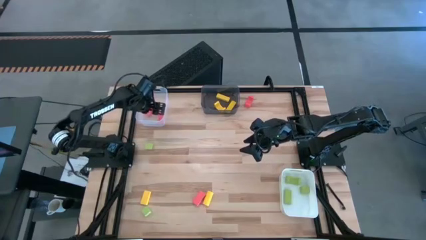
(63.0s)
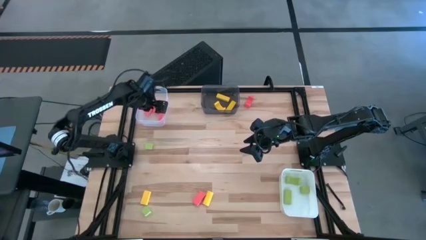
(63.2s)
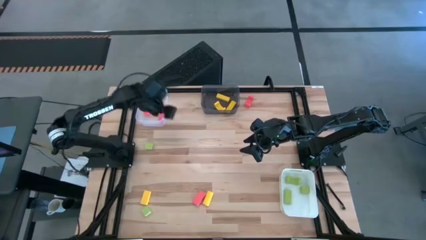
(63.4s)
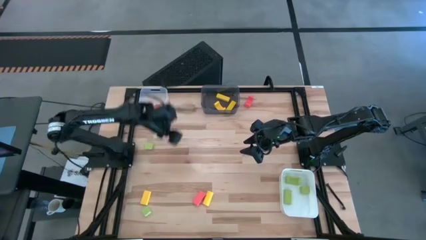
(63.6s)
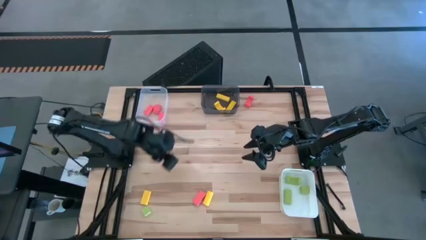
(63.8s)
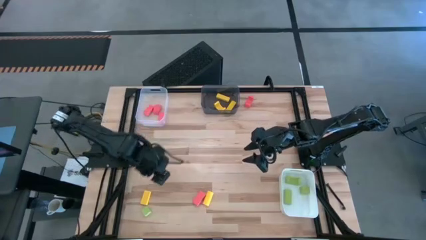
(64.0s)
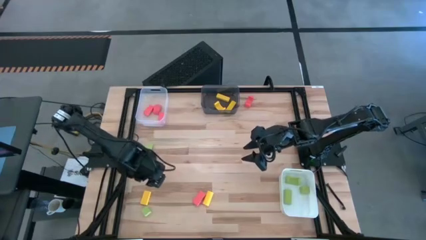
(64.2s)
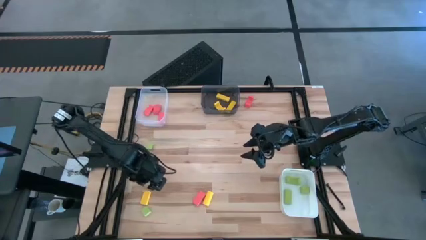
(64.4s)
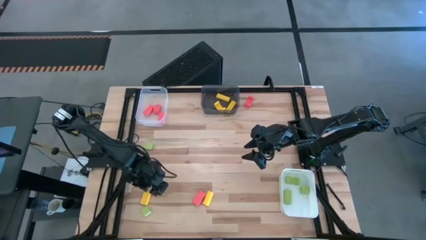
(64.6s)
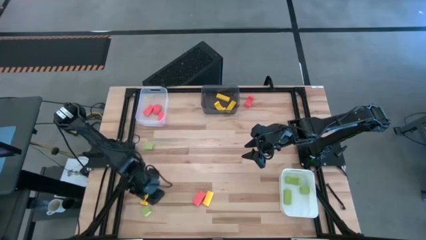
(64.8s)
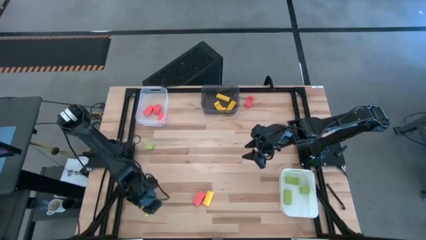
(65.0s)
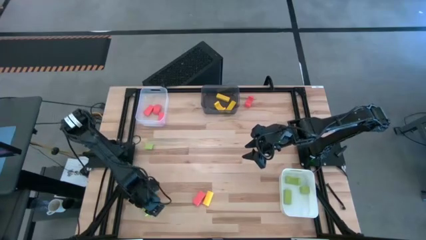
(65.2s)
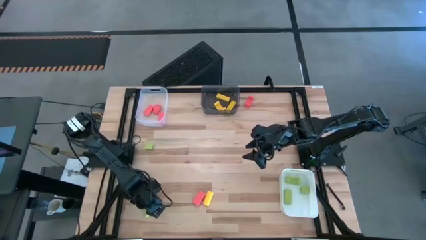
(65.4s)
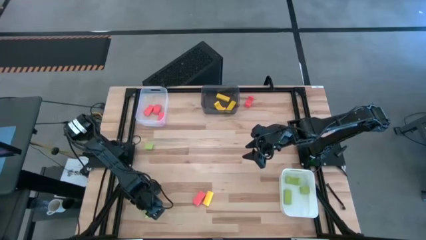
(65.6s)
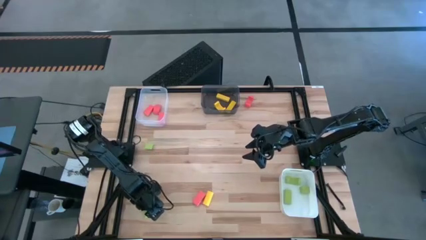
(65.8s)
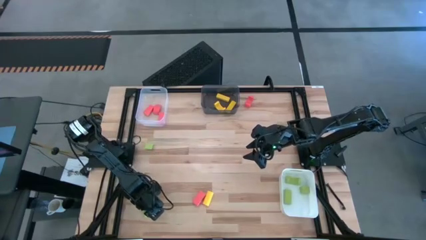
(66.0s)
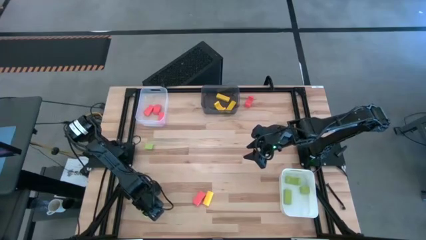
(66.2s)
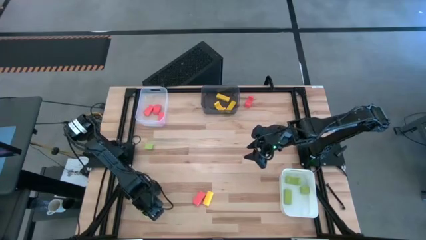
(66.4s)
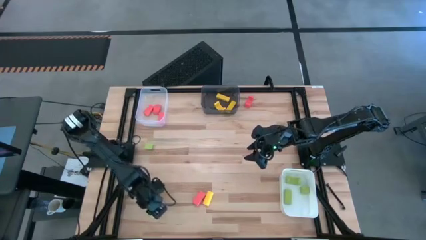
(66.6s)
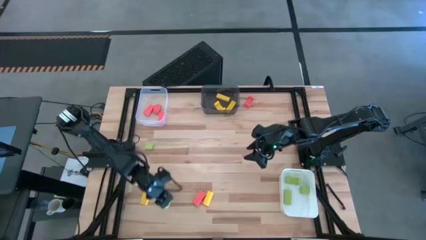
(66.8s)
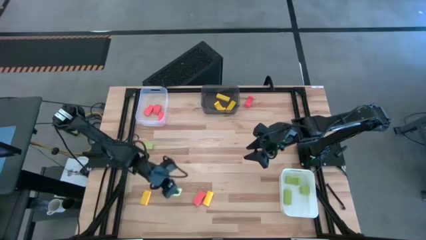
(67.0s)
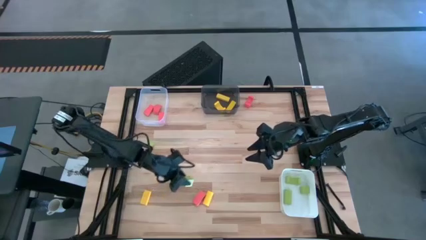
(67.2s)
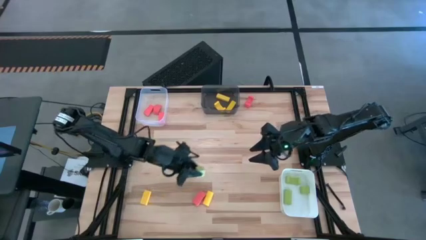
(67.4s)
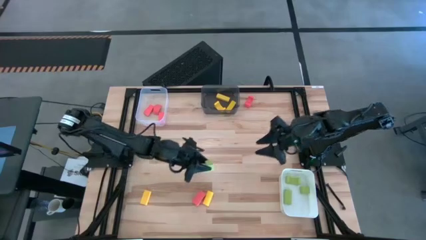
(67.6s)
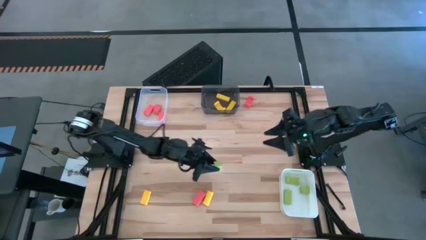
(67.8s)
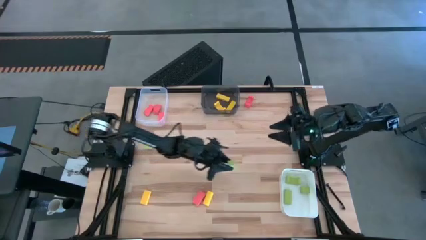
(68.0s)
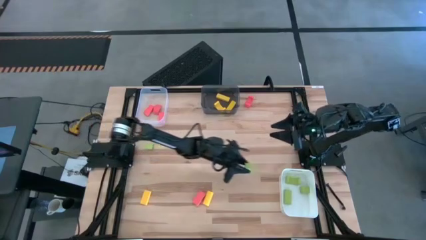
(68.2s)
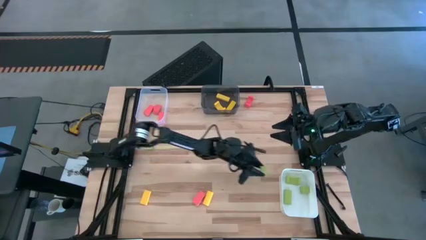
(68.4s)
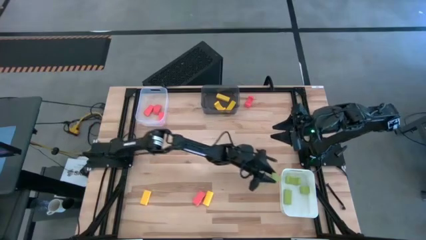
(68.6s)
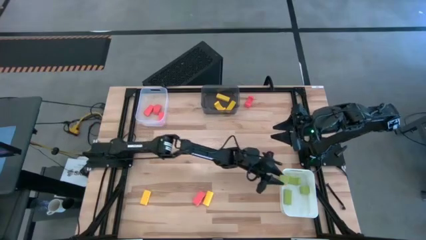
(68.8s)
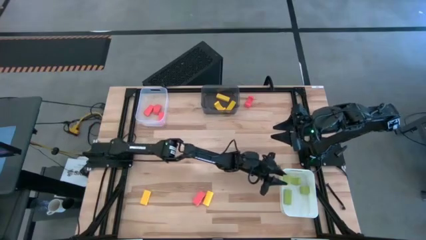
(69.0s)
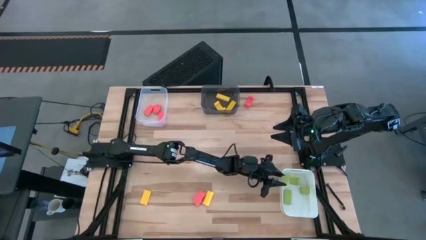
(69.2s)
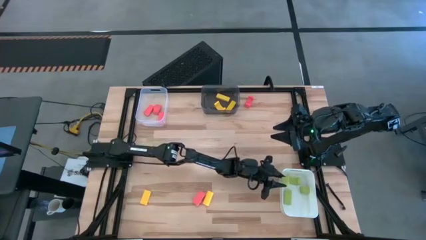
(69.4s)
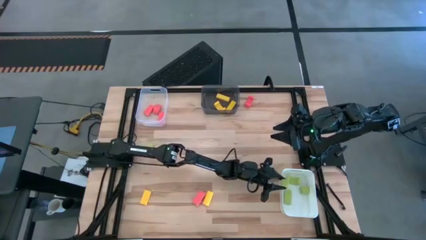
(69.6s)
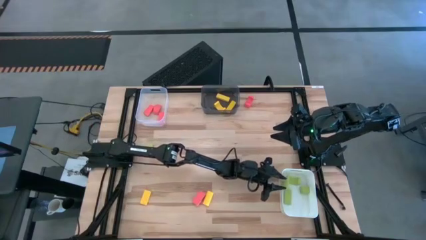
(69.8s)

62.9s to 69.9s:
Task: Sort & place blocks by color
Put the green block into the white bin

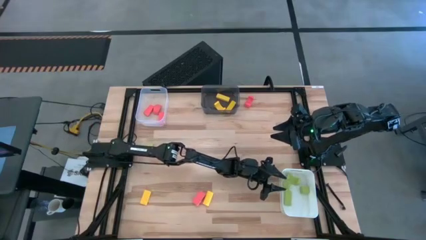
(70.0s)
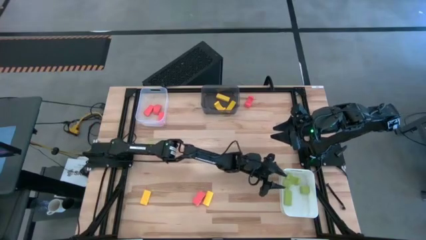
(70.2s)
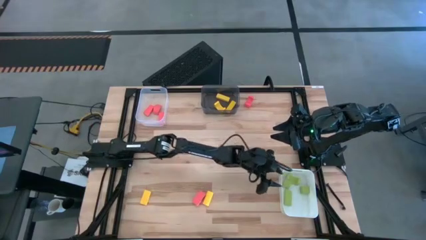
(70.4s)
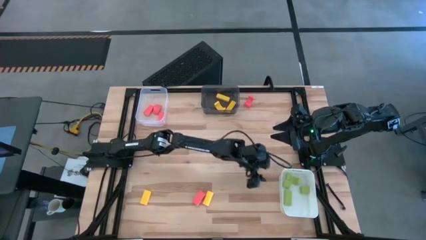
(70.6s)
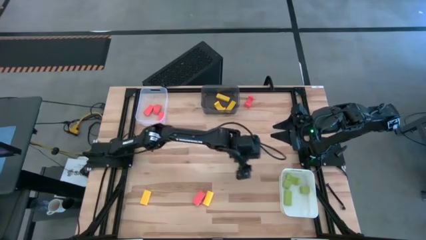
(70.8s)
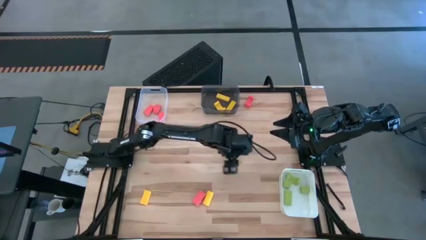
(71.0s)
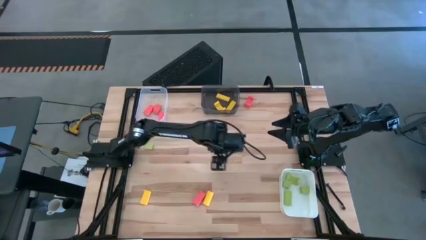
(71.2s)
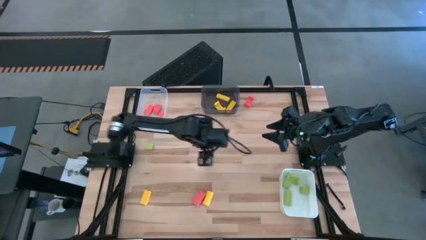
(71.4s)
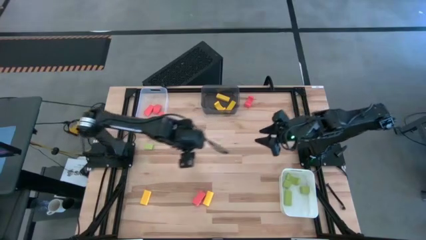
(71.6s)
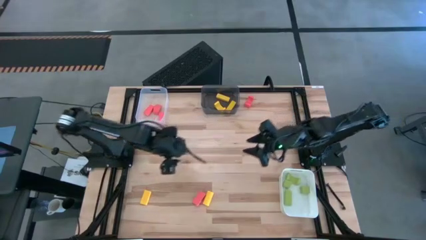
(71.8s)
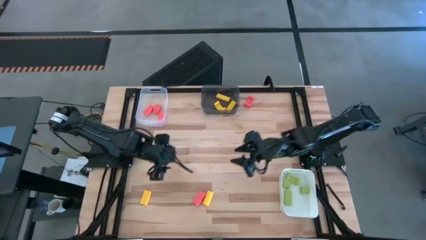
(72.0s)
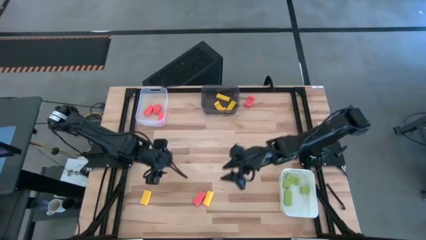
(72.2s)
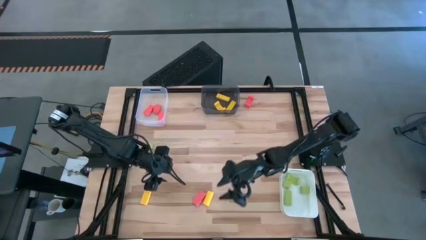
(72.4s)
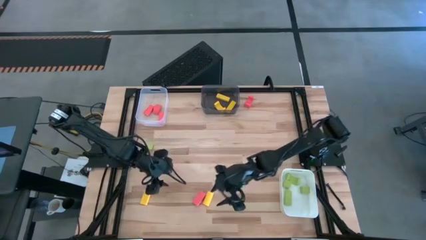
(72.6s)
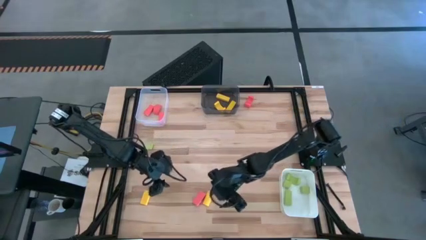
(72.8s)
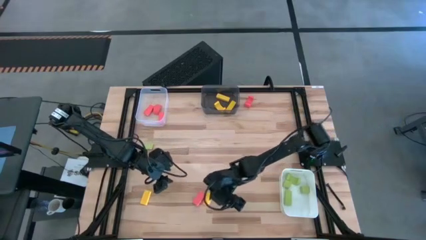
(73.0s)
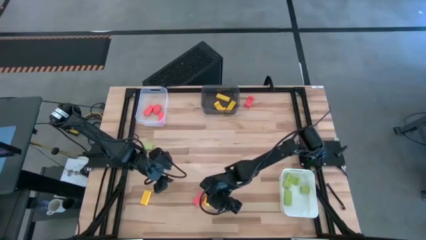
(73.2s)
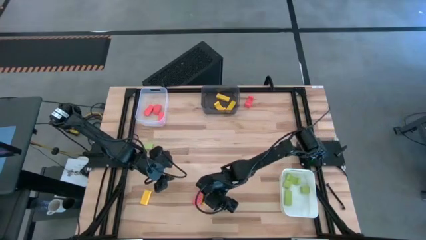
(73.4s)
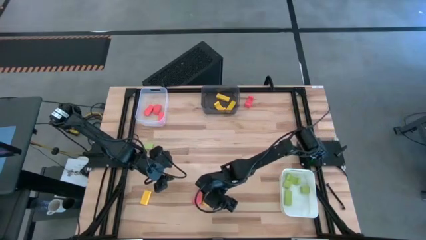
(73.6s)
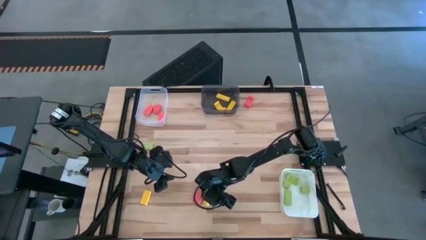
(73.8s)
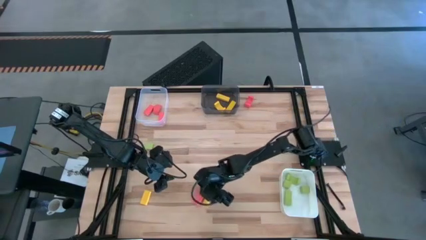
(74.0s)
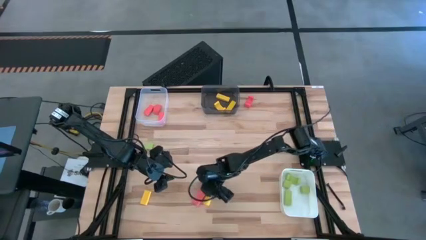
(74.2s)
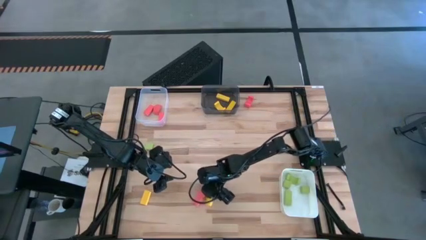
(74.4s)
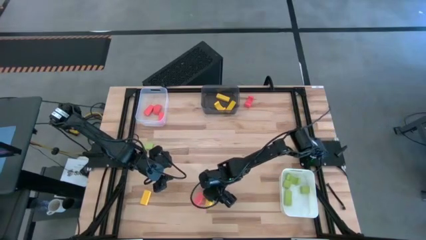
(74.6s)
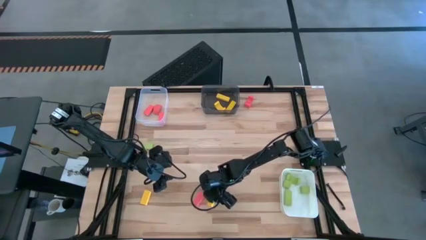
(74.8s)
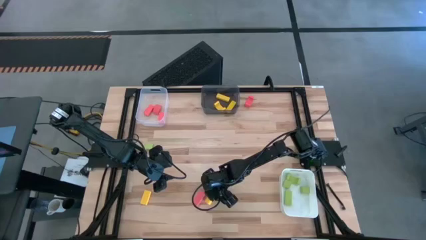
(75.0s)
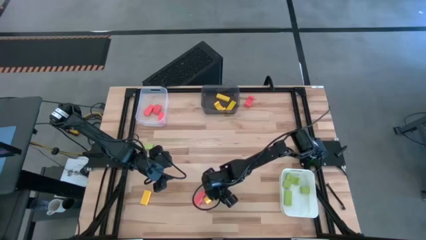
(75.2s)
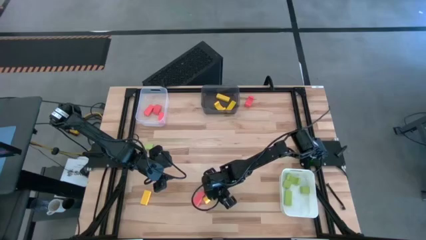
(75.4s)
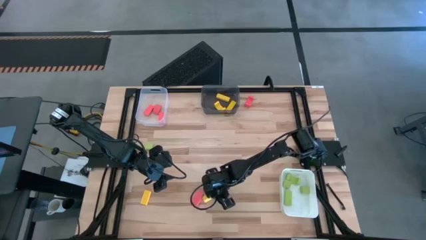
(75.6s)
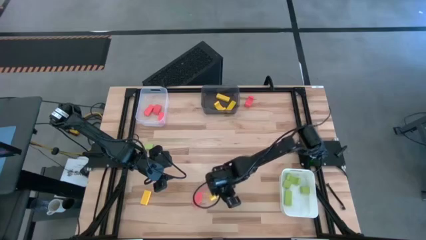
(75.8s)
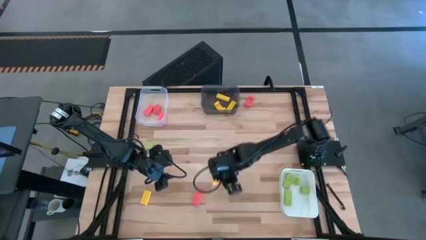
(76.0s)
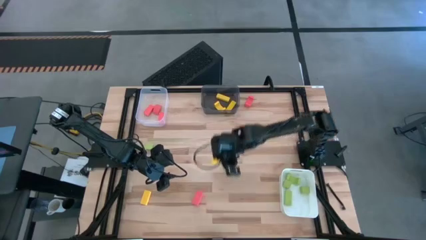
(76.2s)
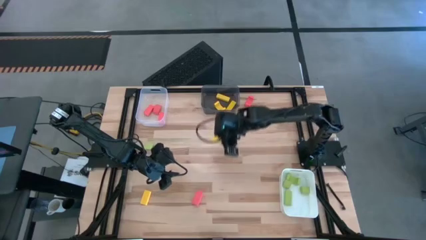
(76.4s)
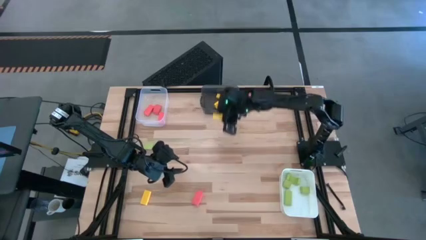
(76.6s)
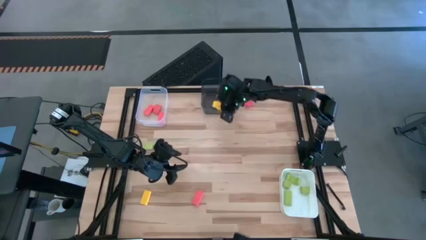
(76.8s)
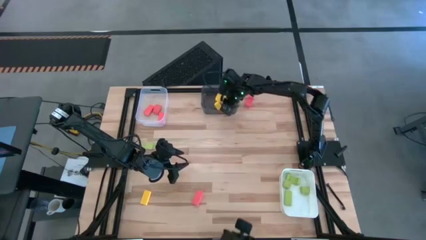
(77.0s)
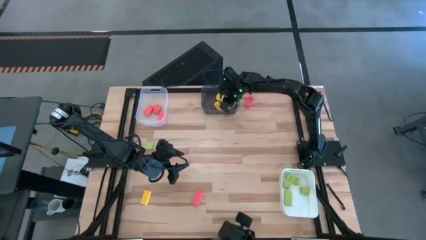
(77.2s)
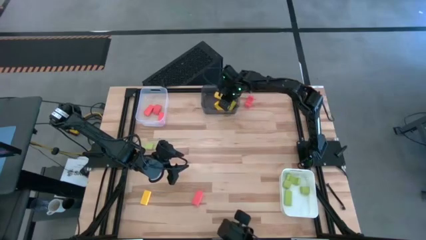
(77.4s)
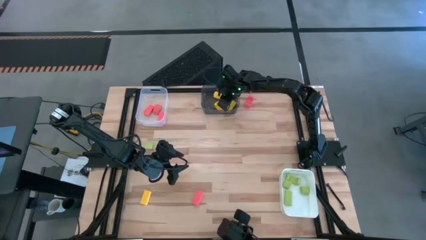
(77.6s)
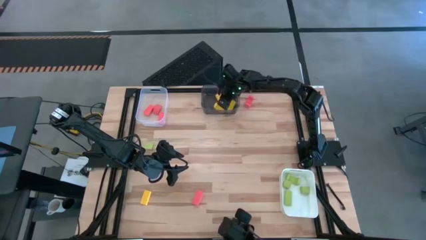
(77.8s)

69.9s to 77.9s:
Put the yellow block into the black bin
